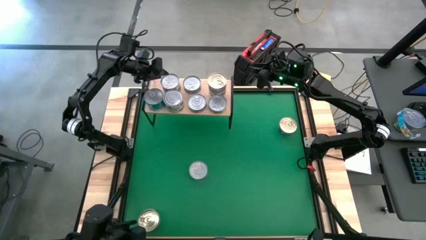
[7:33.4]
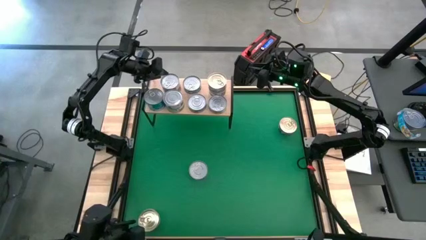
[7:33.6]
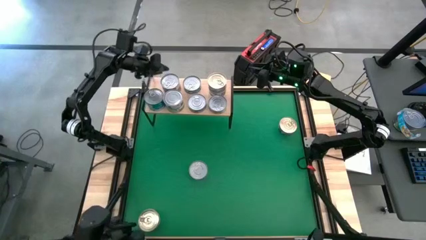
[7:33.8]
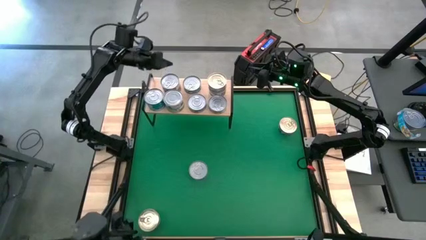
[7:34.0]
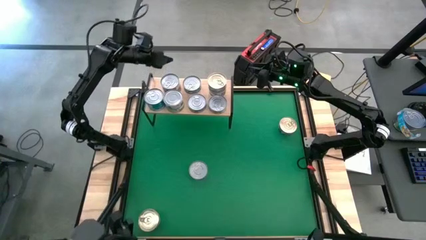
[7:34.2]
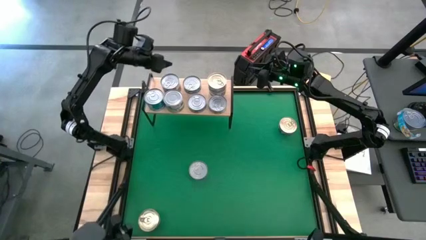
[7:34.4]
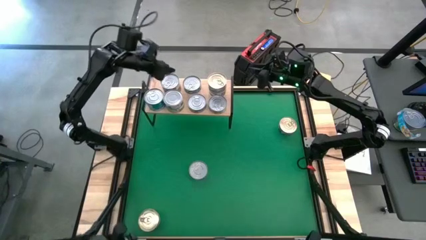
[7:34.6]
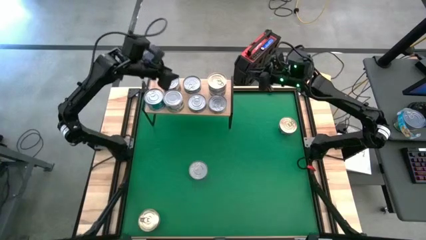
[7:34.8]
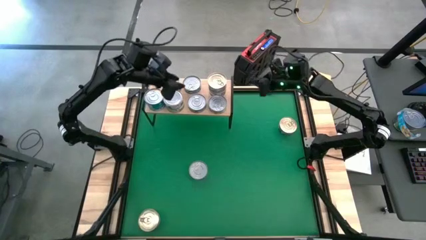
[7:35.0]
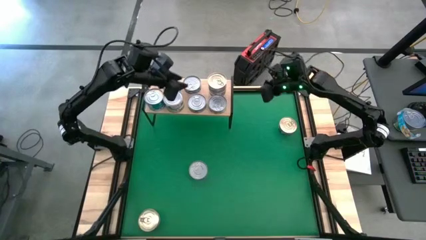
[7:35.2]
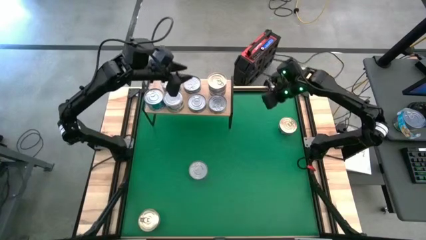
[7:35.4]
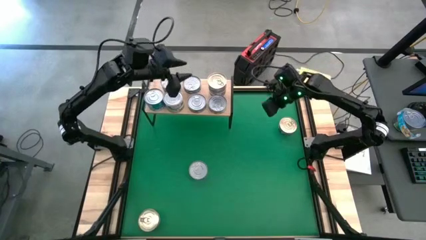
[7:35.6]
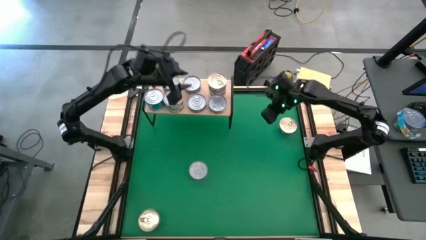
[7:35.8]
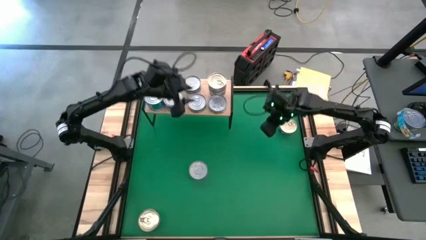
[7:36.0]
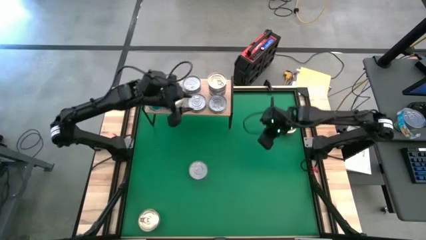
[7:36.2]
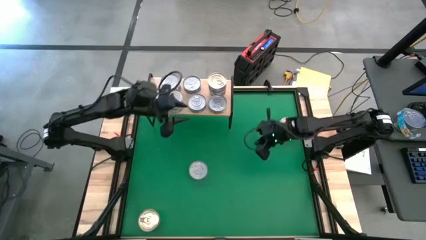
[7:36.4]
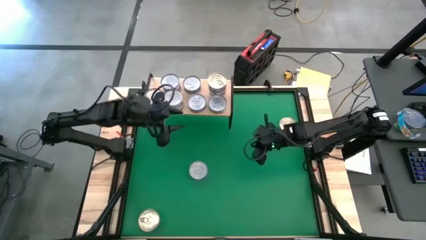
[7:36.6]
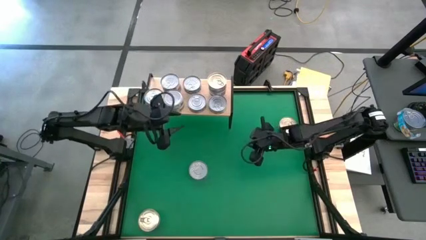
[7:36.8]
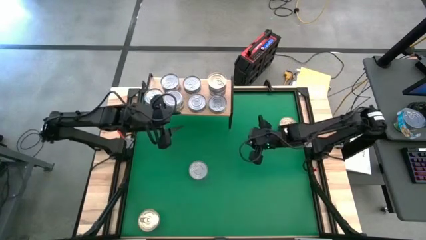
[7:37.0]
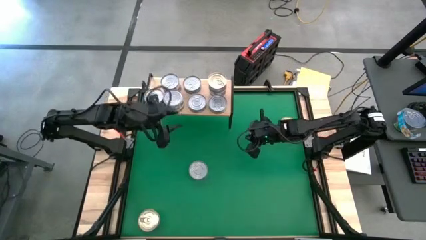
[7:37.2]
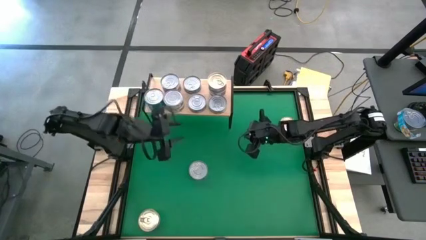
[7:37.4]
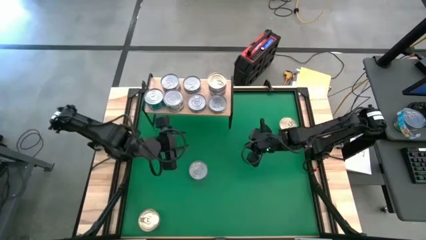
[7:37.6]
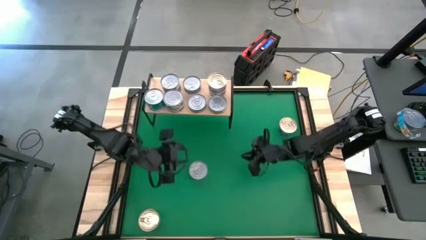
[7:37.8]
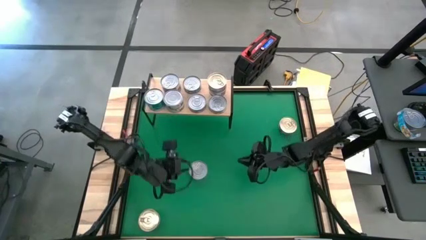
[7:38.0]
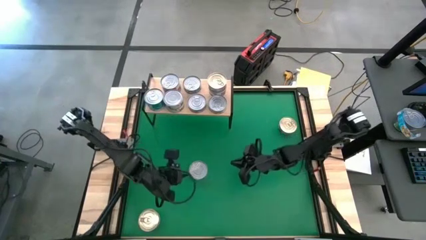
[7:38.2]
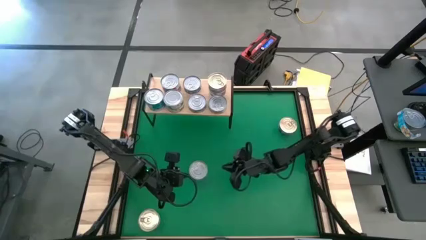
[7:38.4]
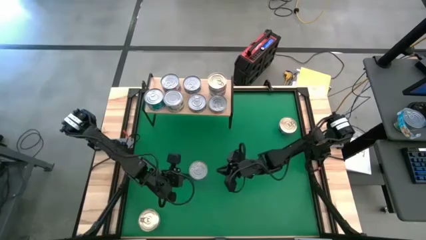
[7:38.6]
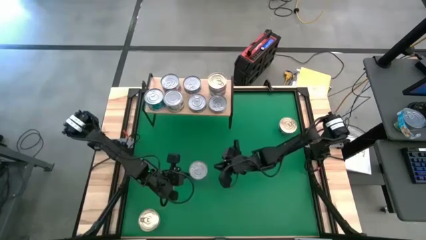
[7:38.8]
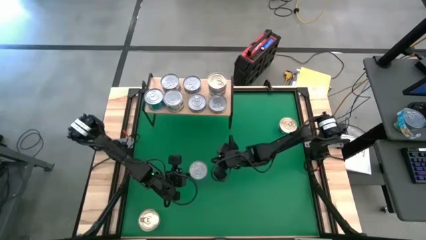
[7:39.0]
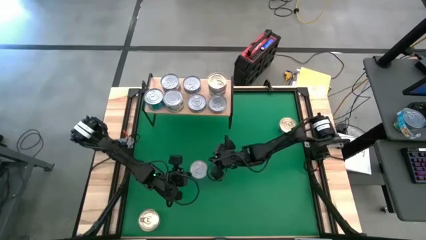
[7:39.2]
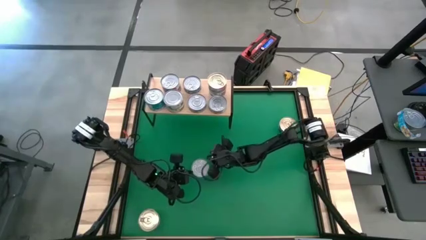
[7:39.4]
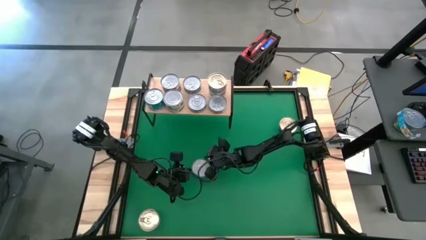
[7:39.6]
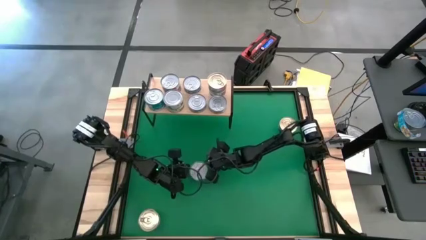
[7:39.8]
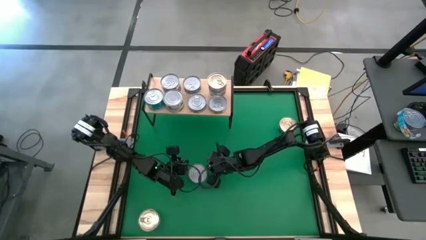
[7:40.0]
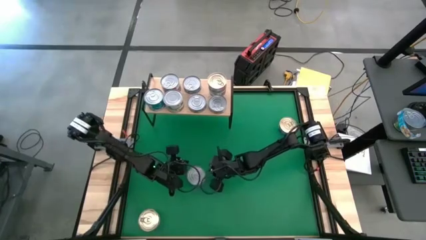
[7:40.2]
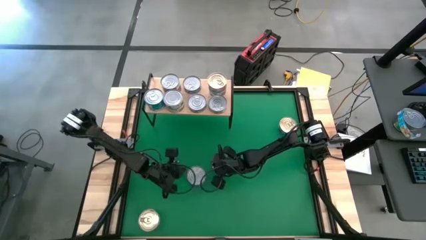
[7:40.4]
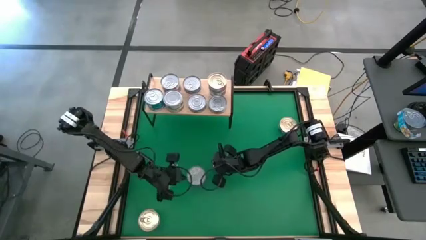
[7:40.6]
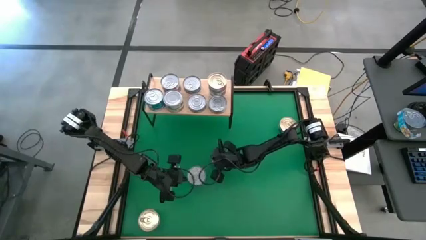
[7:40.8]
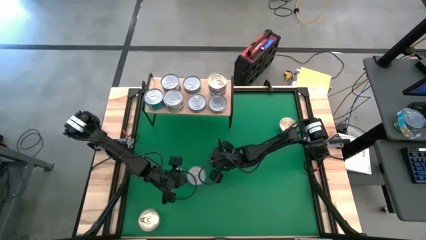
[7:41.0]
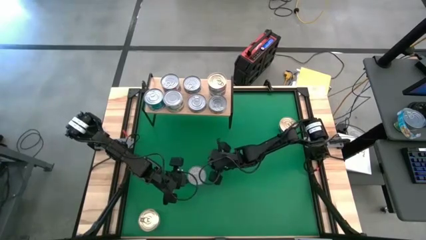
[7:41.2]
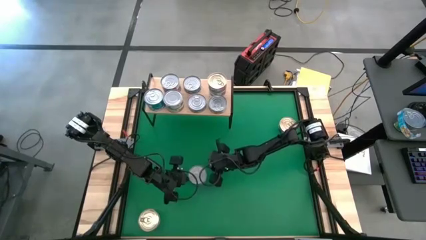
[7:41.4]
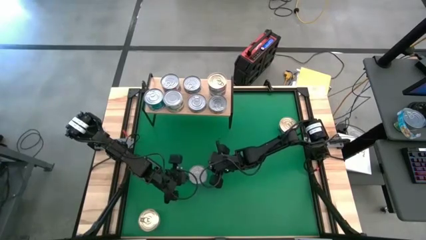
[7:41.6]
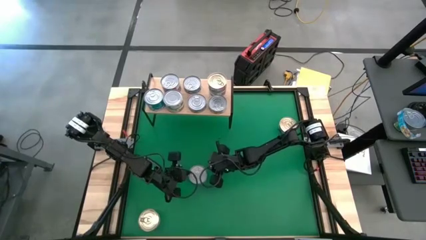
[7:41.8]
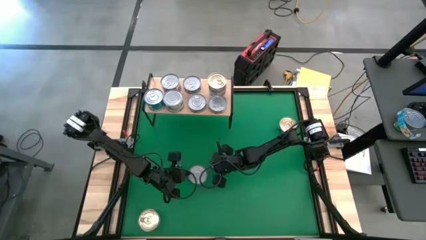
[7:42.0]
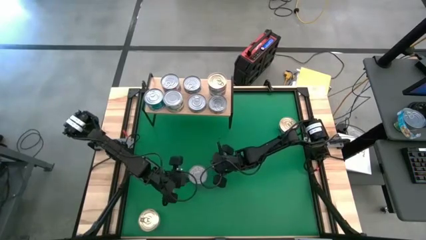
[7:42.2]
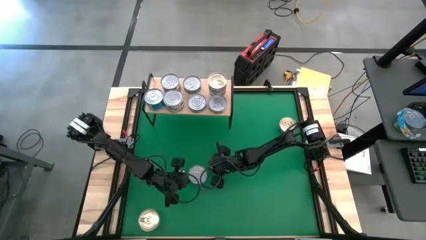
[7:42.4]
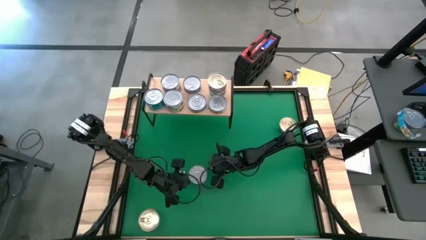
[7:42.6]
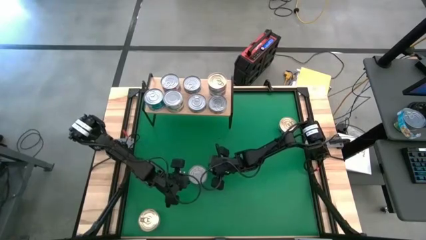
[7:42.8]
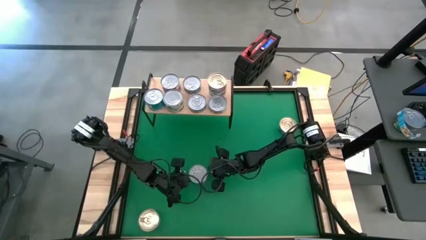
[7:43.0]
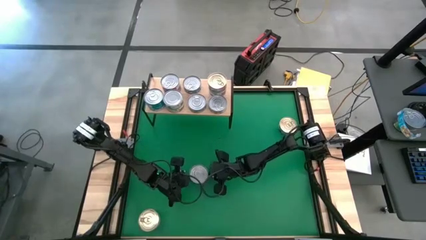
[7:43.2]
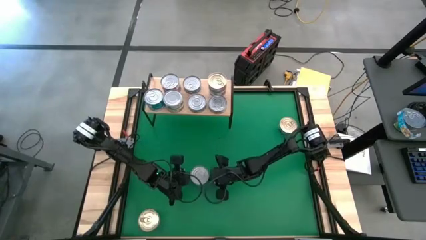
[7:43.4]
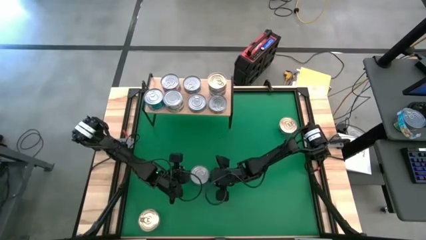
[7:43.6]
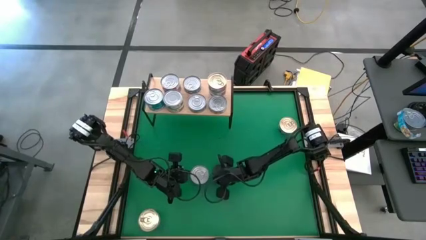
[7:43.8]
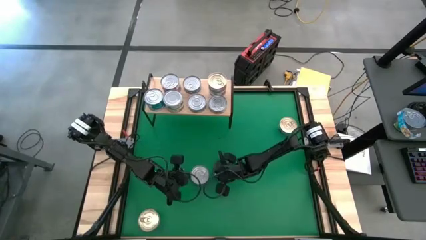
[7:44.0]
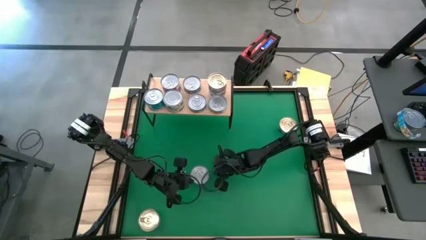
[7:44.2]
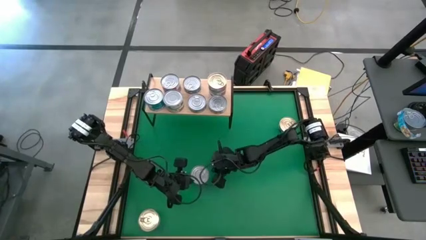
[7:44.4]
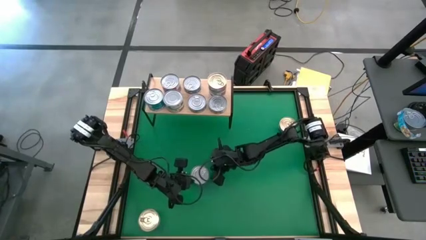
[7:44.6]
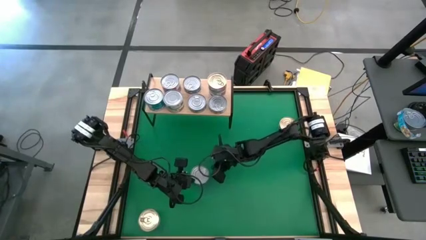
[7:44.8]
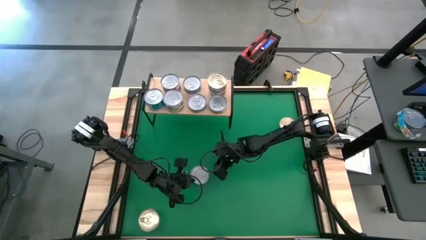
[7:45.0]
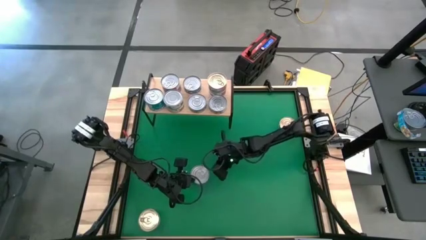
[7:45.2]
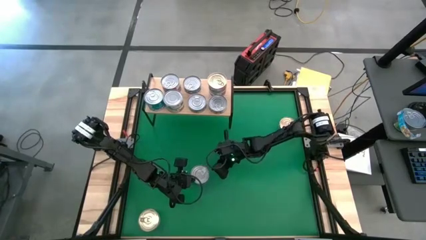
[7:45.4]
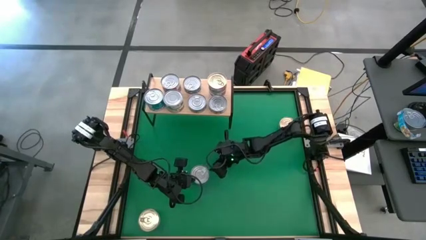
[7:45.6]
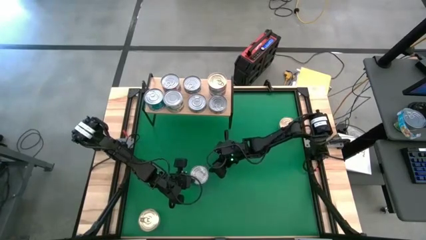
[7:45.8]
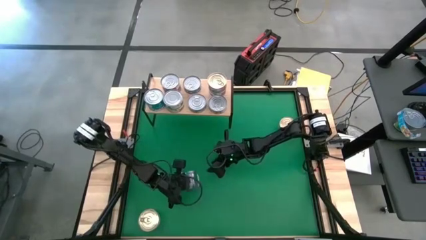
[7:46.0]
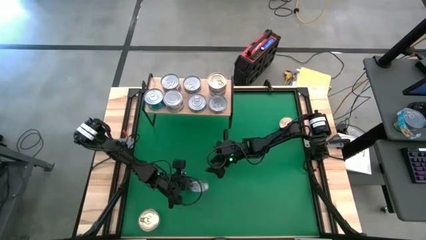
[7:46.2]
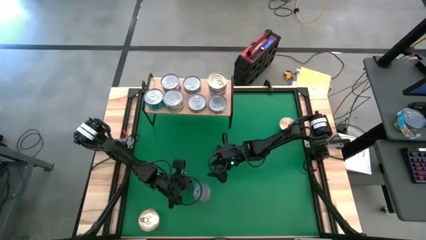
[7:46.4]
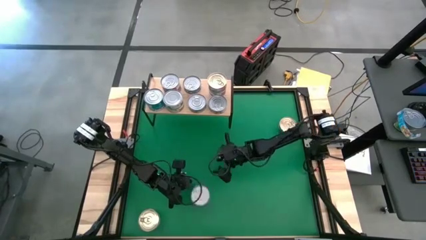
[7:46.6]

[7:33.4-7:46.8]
Task: Stack canned seafood by type on shelf
Stack the center dark blue tuna can on top of the dark blue tuna can on the shelf
